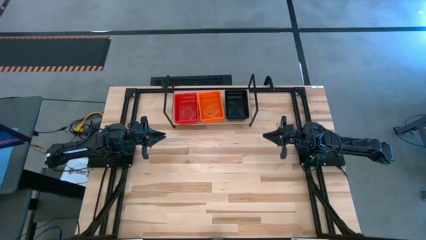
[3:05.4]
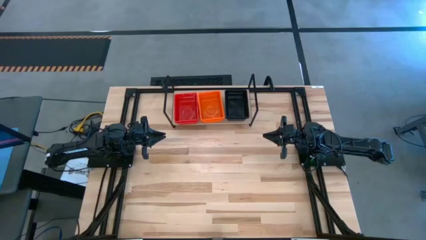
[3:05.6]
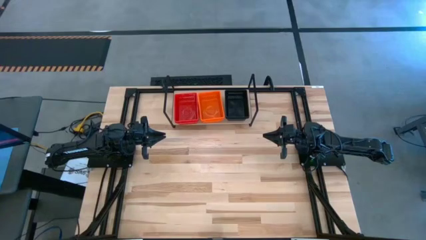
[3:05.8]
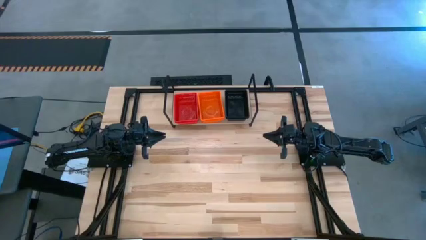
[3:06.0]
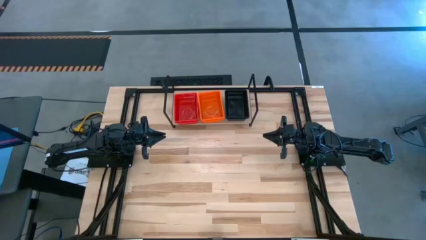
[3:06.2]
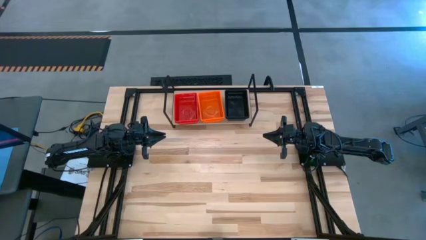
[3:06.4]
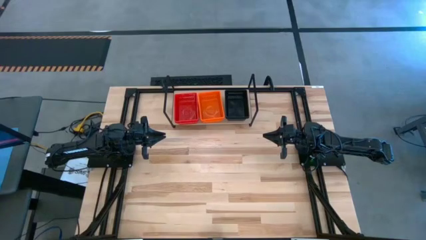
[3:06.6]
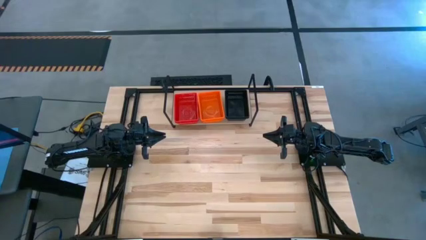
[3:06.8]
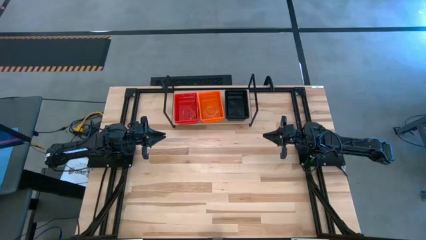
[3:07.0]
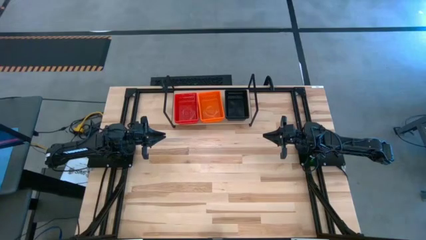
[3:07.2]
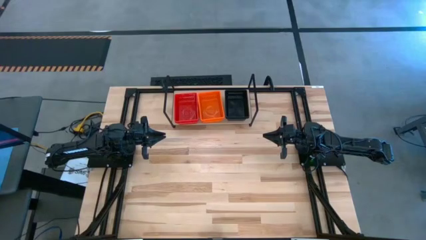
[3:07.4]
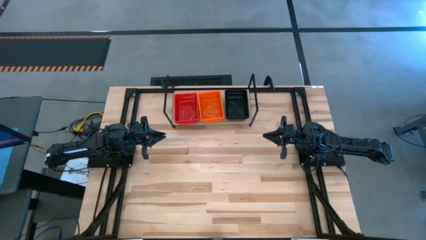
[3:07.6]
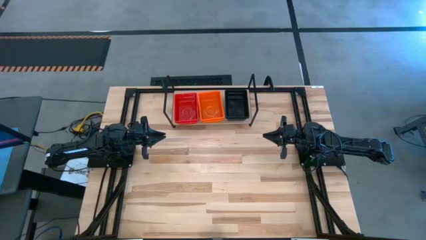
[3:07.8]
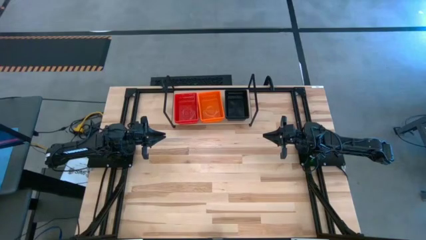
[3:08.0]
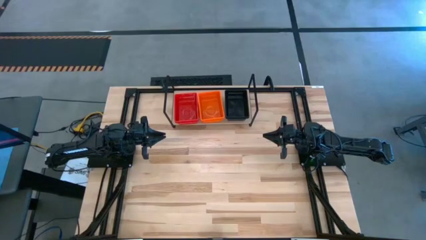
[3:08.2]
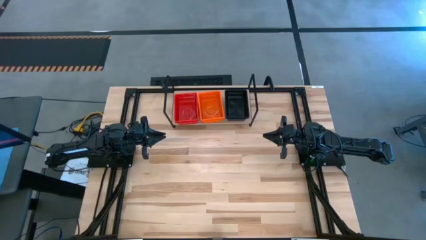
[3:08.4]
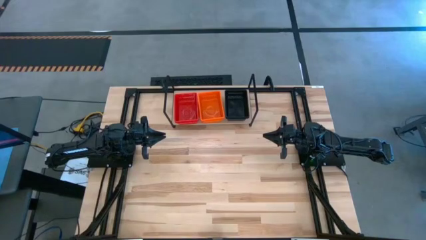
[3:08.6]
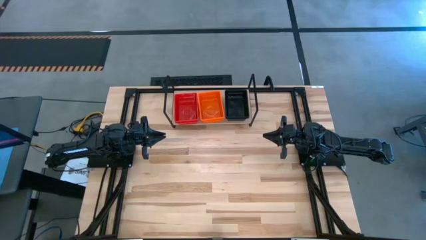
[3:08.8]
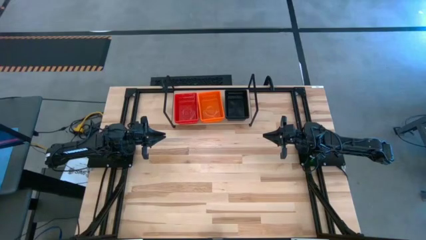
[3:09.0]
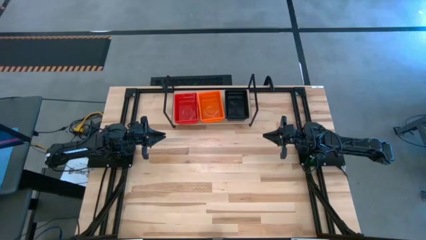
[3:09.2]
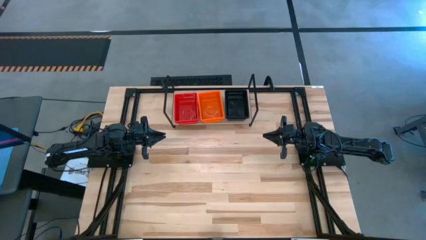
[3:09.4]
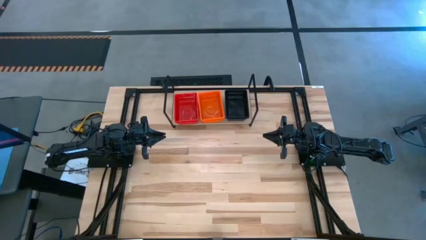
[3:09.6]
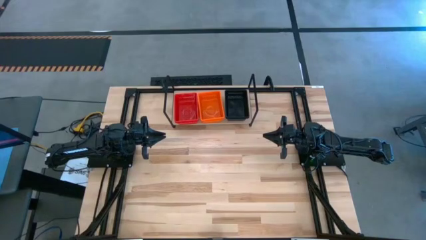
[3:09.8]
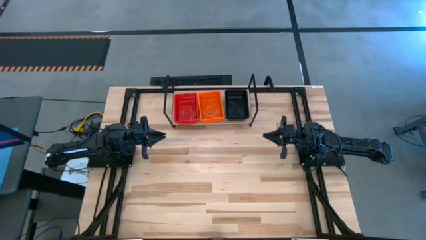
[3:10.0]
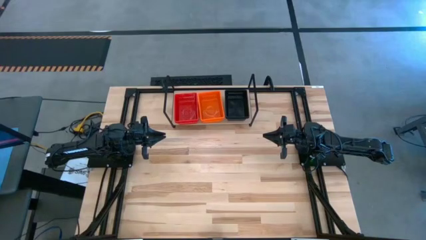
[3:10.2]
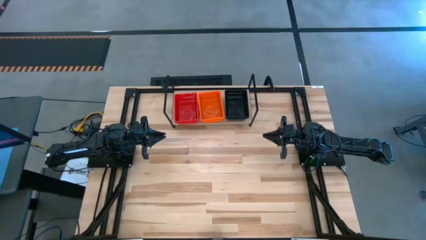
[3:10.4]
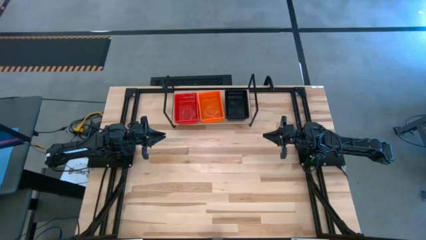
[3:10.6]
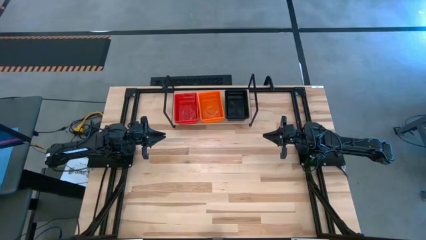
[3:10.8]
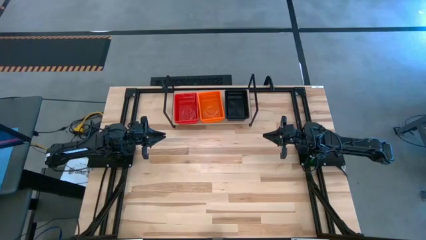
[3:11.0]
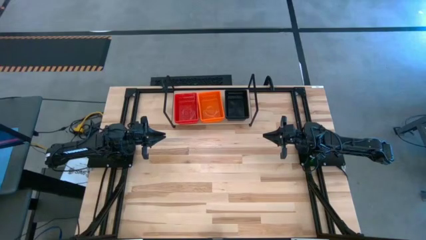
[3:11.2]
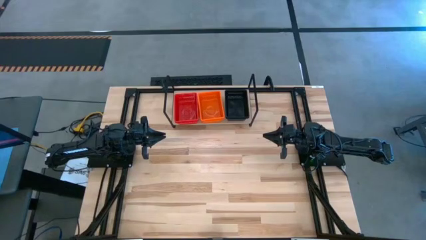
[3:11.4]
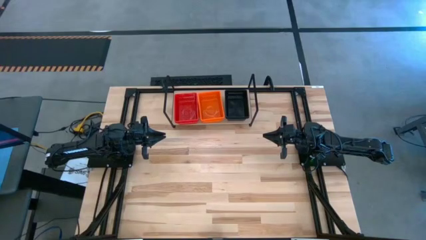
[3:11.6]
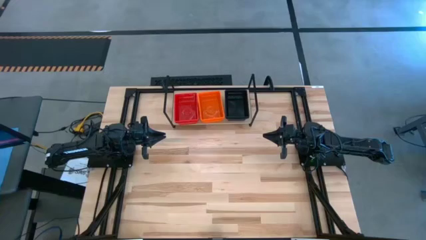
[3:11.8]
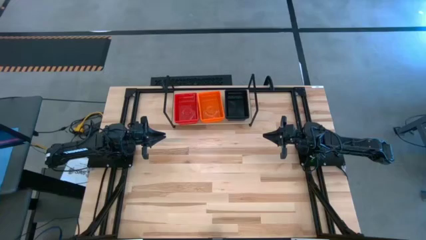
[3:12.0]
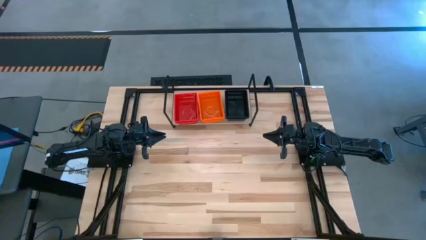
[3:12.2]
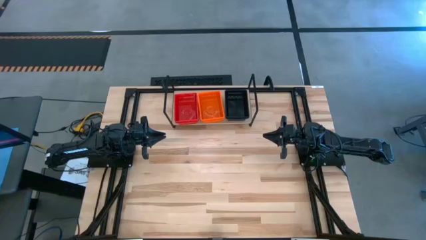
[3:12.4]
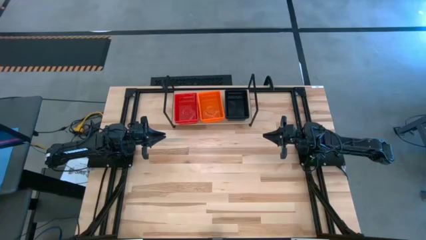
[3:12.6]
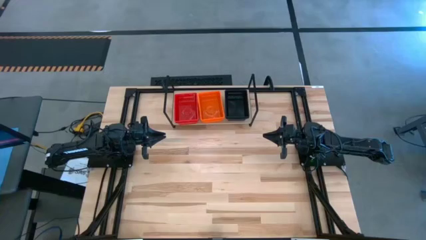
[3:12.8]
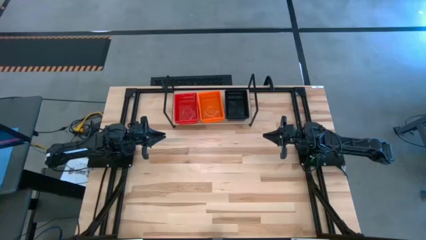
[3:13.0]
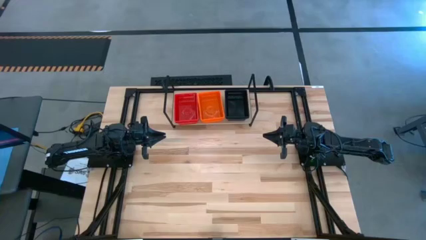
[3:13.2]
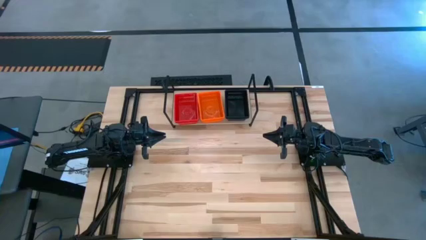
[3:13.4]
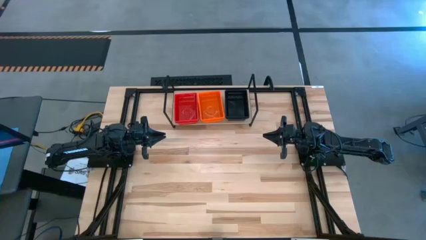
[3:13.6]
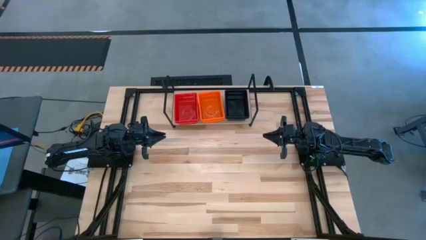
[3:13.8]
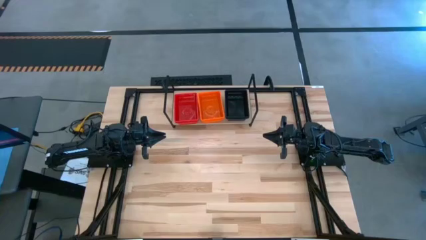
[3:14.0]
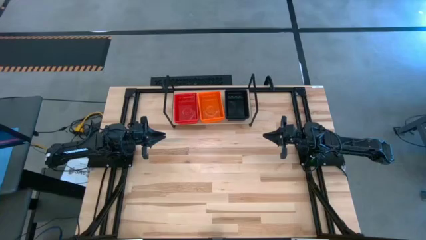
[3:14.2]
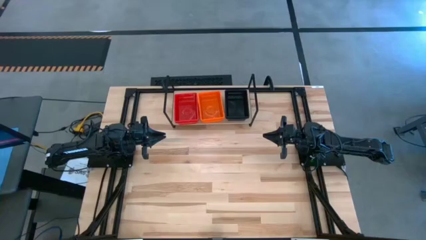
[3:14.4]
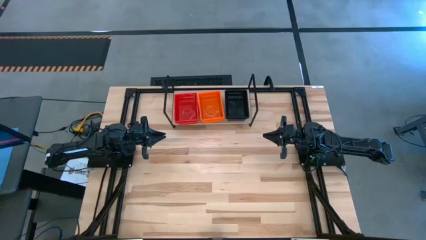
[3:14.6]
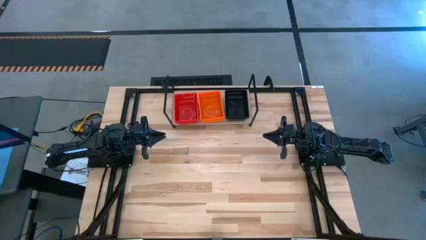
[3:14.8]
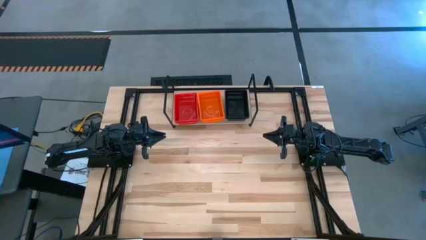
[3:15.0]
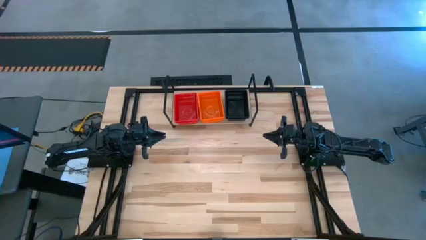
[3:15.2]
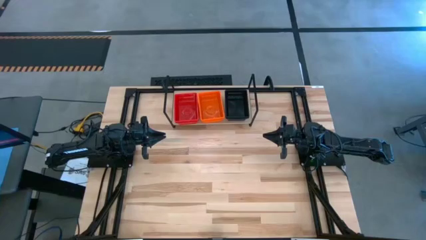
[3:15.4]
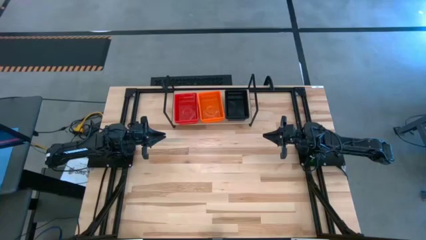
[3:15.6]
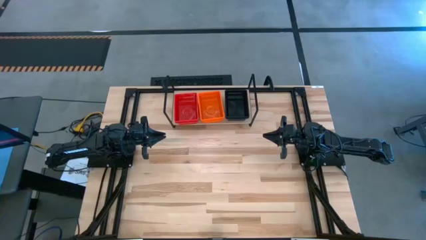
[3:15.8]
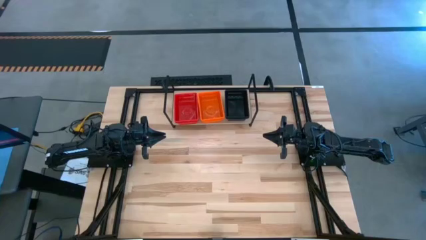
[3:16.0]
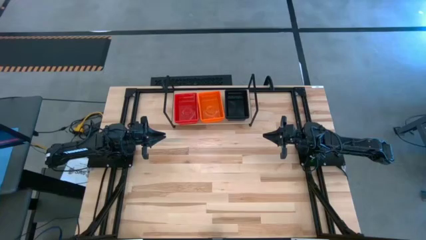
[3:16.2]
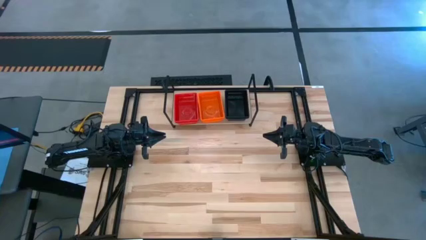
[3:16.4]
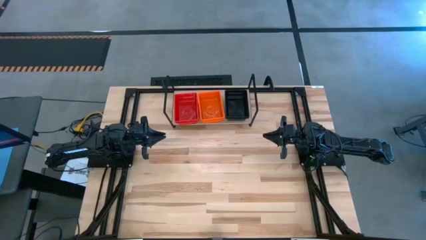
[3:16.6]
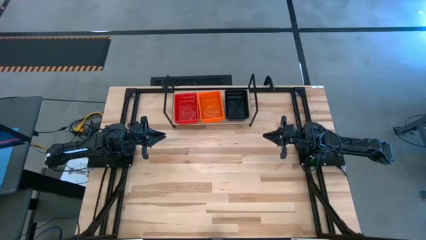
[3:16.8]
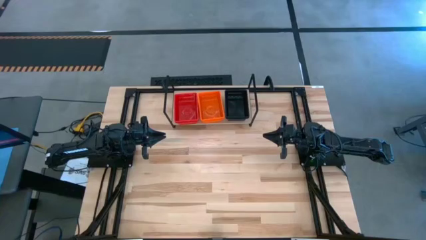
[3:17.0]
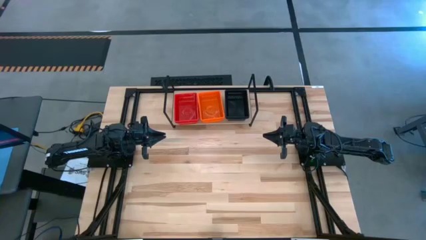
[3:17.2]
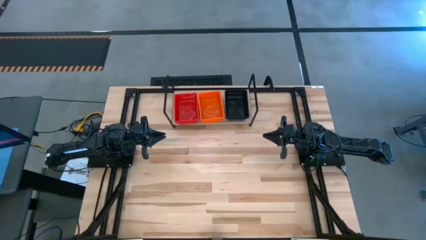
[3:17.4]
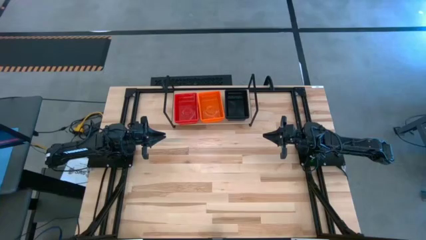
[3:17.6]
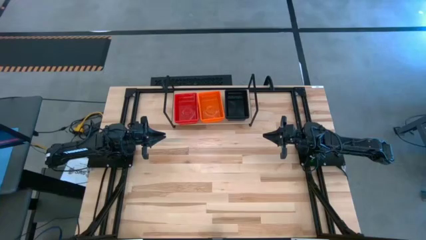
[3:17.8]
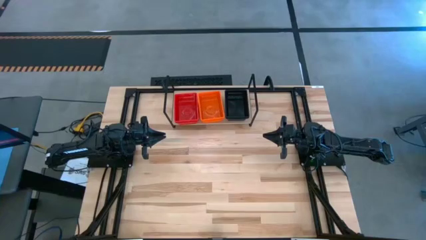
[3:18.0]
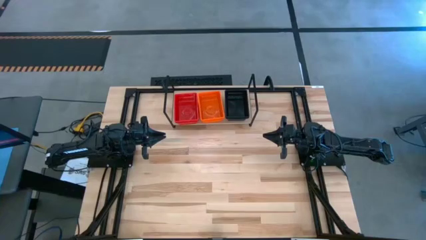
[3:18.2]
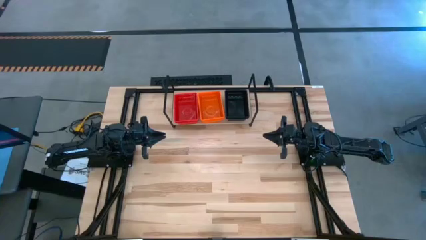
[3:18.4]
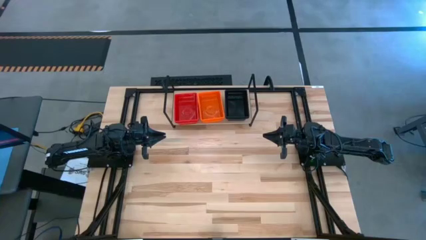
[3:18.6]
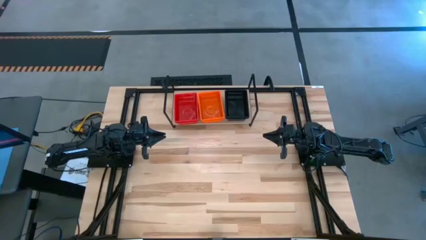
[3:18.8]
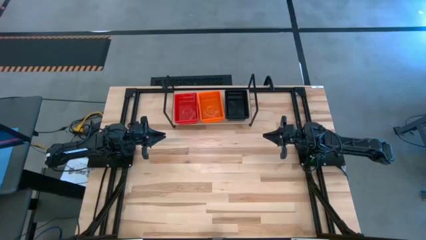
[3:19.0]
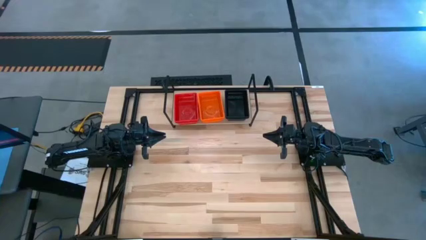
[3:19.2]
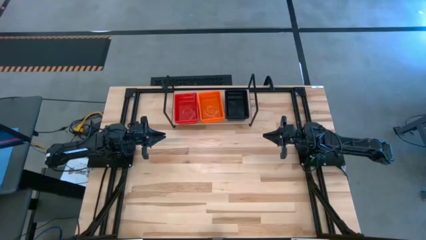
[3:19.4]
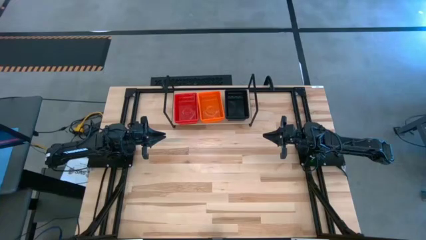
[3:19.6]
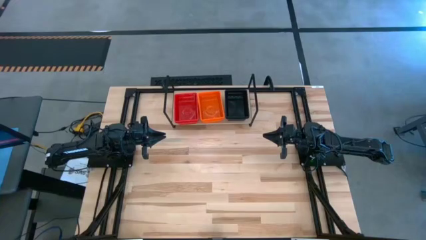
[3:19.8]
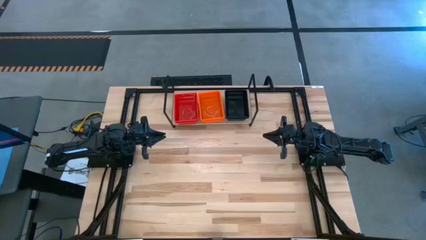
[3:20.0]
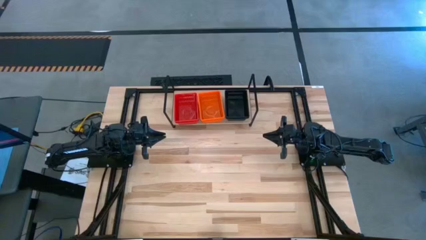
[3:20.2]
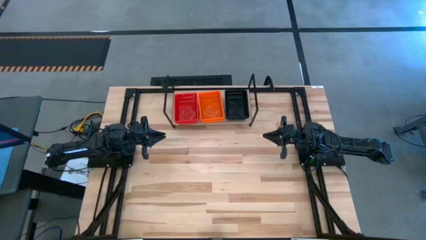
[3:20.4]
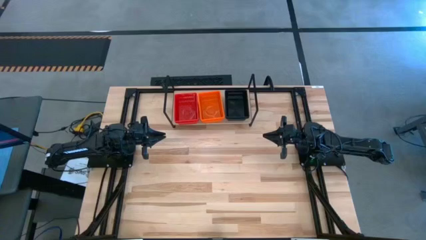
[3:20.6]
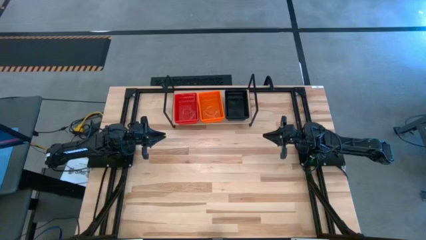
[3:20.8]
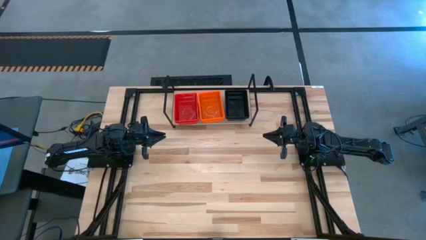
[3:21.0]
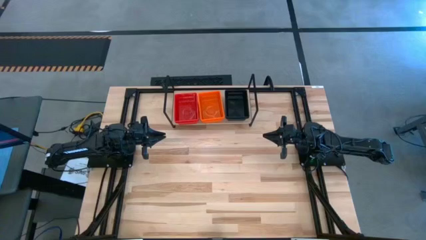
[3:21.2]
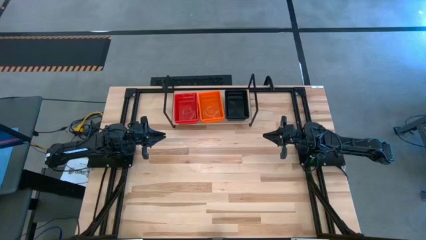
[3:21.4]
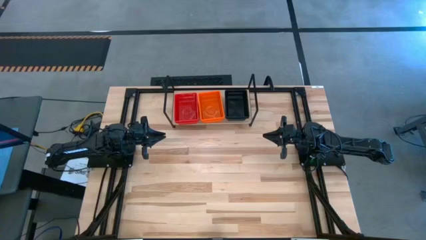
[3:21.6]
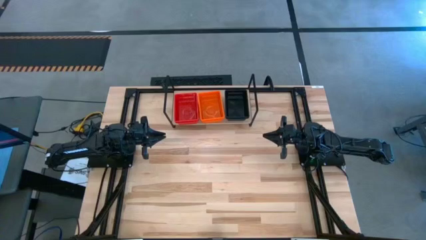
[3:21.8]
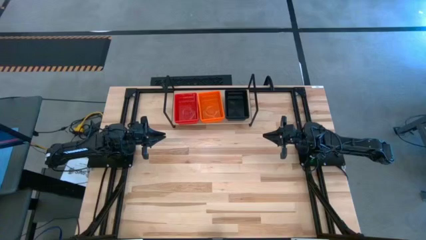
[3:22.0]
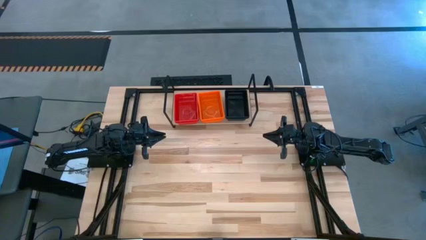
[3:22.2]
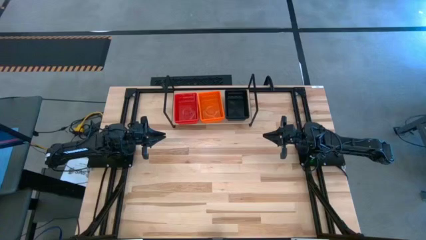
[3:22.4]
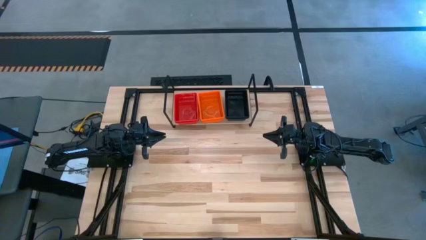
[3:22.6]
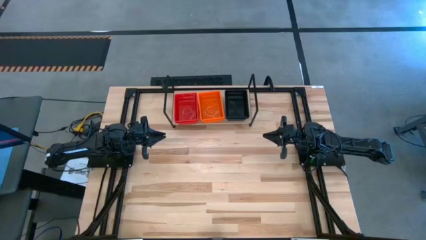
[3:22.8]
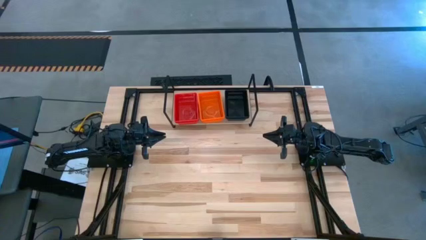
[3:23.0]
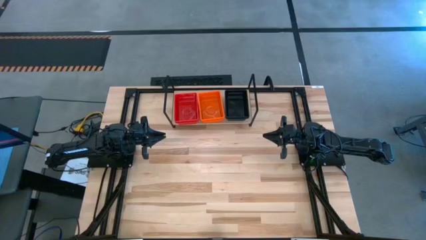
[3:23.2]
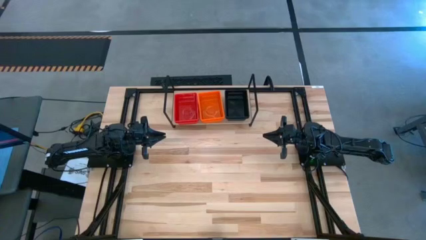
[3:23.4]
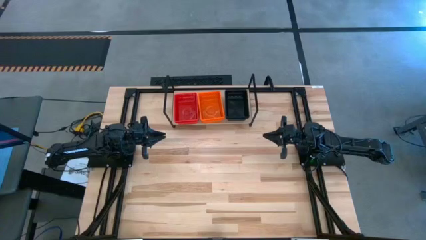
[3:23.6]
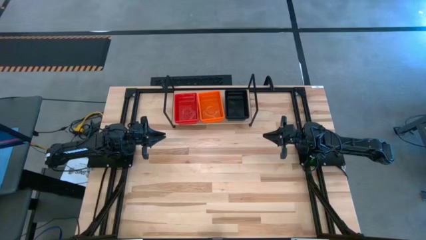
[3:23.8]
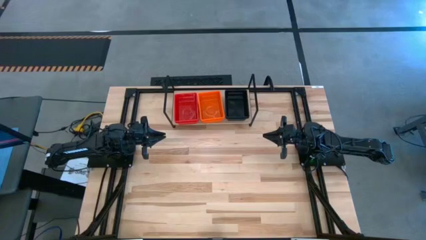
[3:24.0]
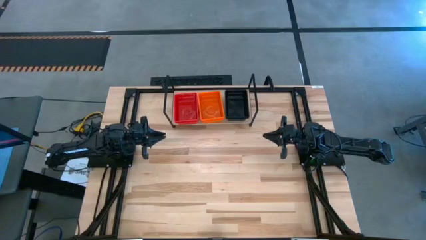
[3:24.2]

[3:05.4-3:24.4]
Task: Stack baskets on shelf by color
Return to Home Position
